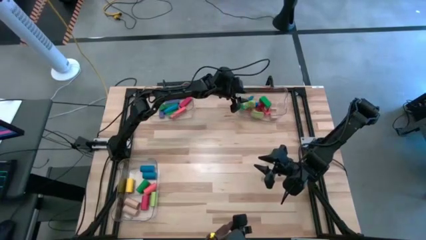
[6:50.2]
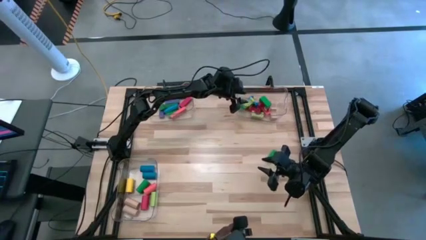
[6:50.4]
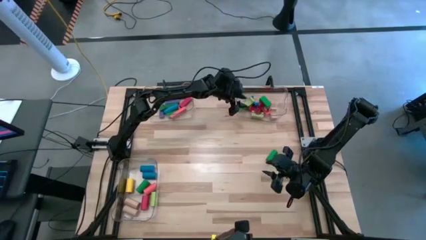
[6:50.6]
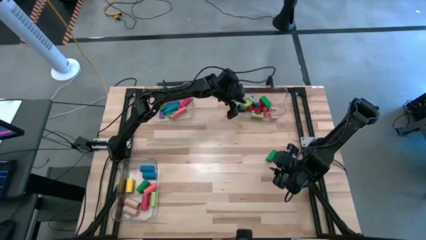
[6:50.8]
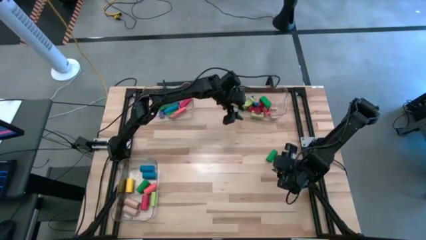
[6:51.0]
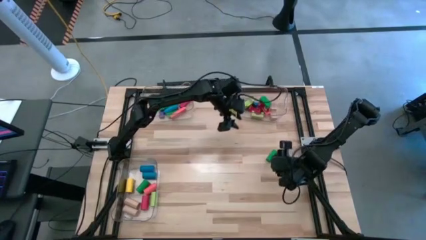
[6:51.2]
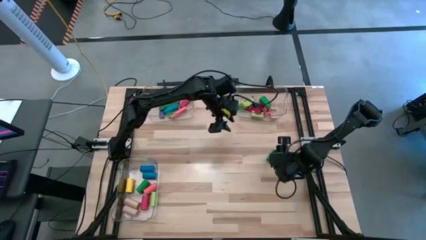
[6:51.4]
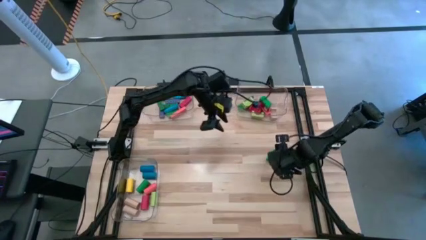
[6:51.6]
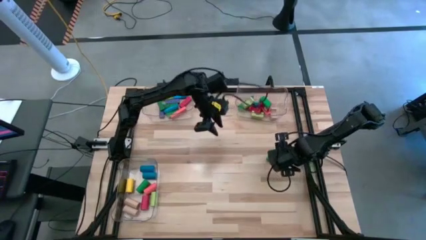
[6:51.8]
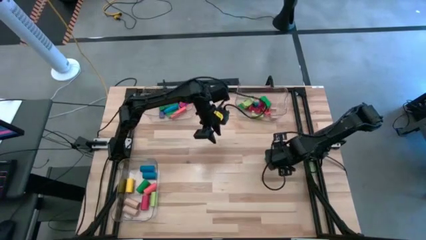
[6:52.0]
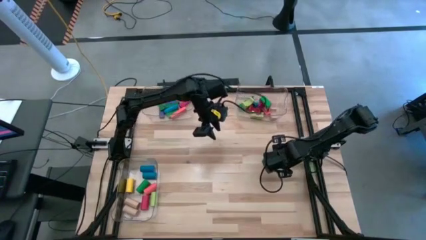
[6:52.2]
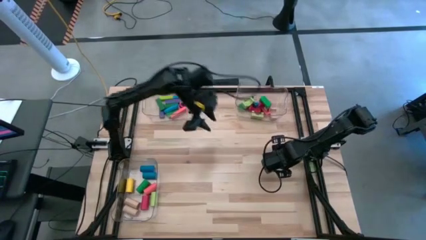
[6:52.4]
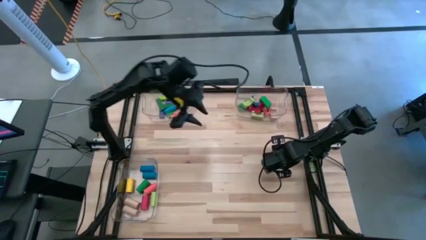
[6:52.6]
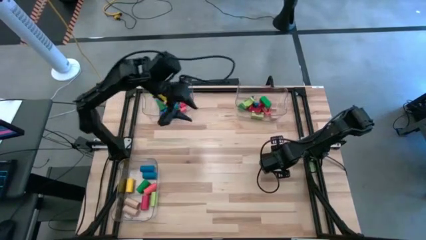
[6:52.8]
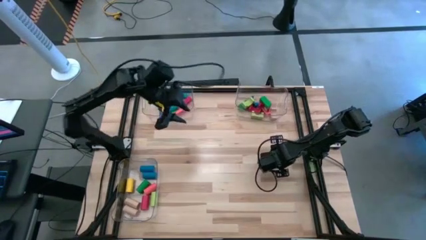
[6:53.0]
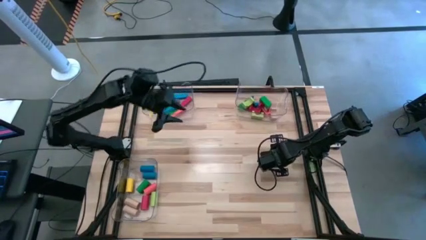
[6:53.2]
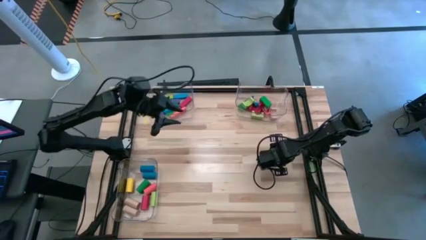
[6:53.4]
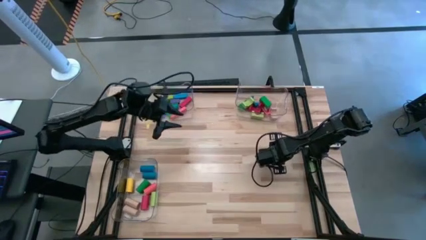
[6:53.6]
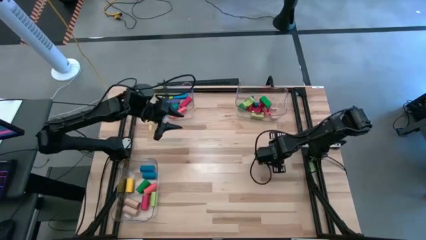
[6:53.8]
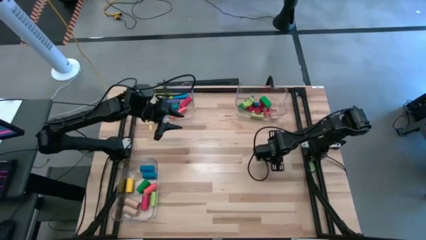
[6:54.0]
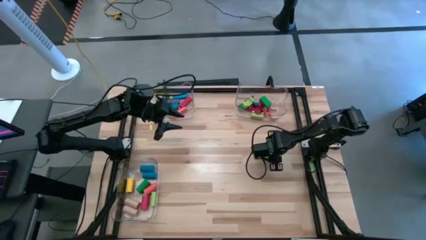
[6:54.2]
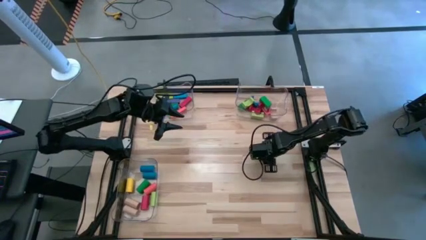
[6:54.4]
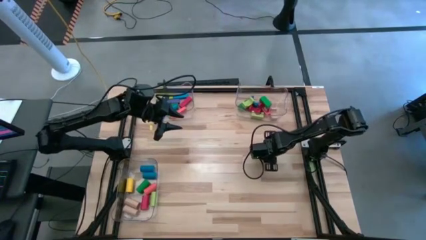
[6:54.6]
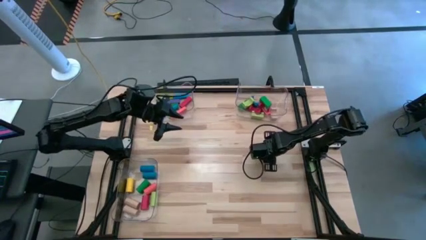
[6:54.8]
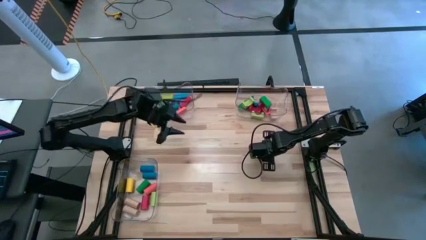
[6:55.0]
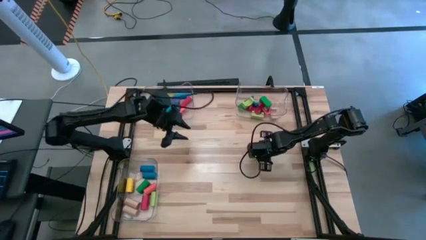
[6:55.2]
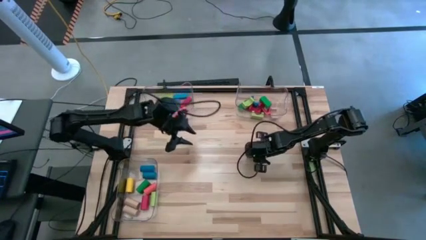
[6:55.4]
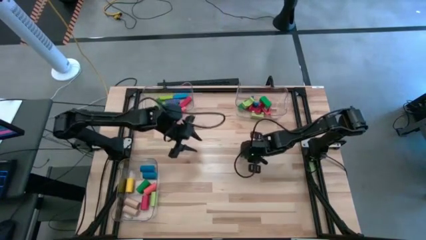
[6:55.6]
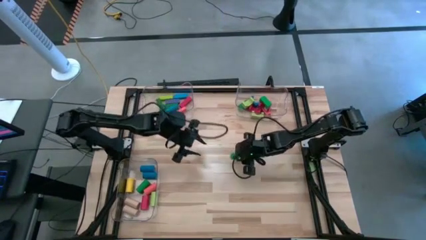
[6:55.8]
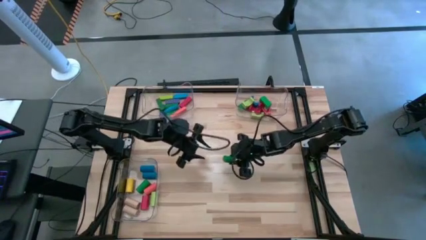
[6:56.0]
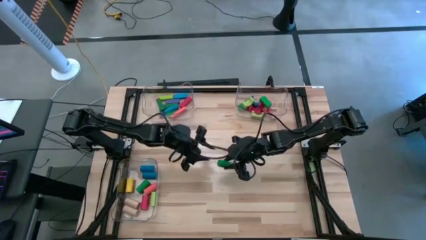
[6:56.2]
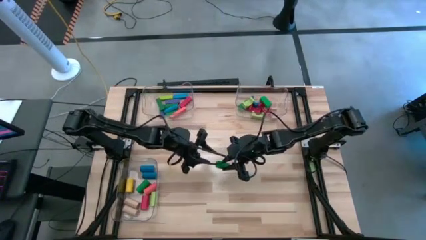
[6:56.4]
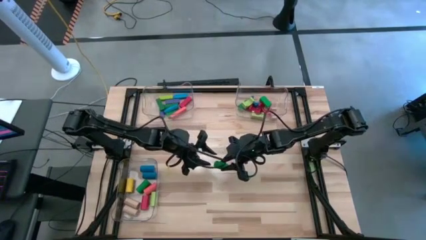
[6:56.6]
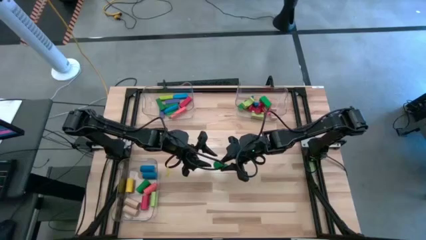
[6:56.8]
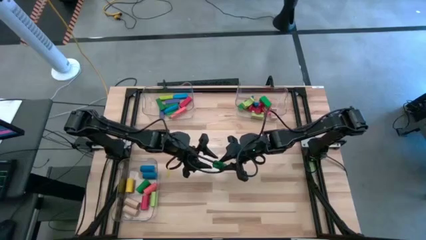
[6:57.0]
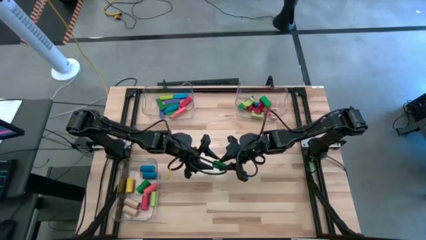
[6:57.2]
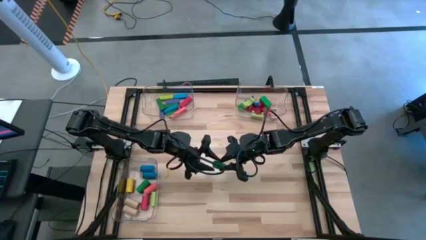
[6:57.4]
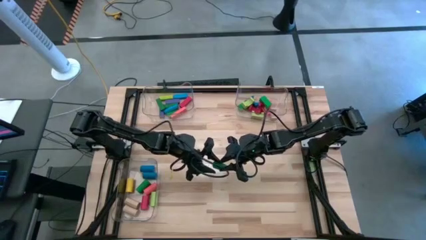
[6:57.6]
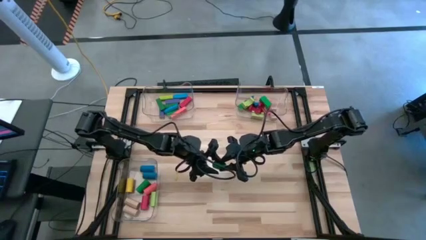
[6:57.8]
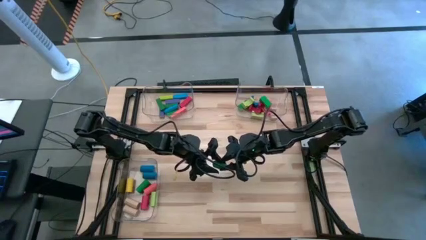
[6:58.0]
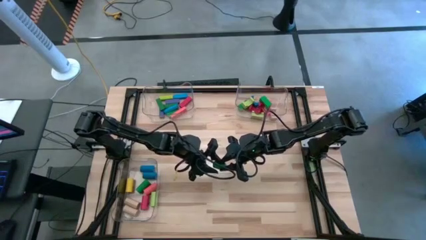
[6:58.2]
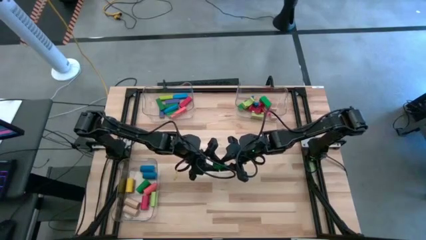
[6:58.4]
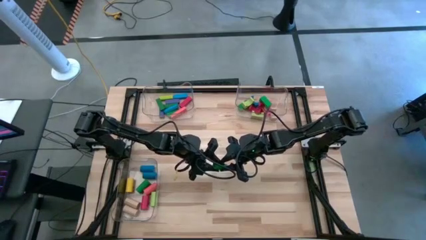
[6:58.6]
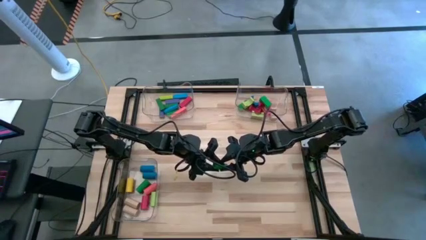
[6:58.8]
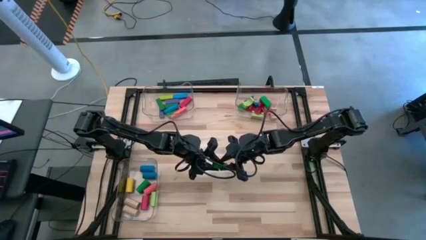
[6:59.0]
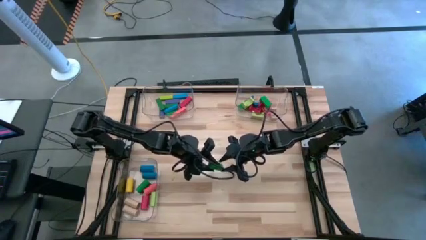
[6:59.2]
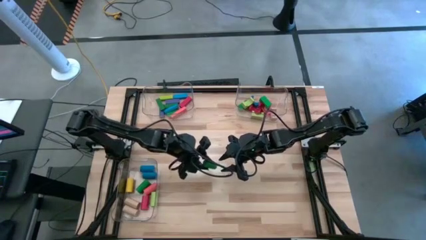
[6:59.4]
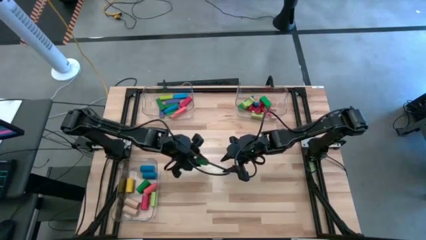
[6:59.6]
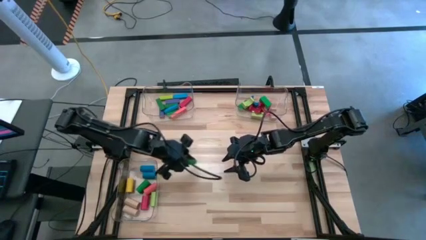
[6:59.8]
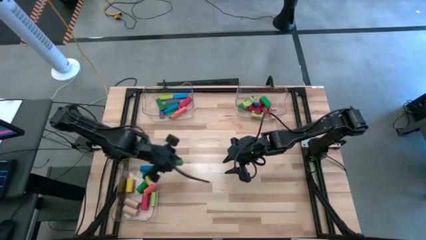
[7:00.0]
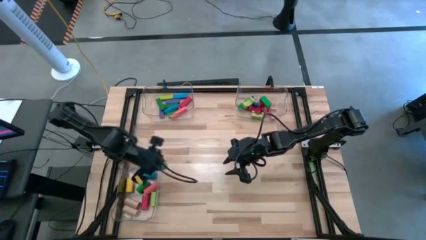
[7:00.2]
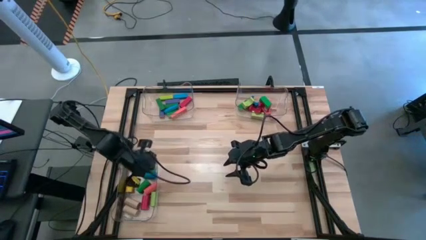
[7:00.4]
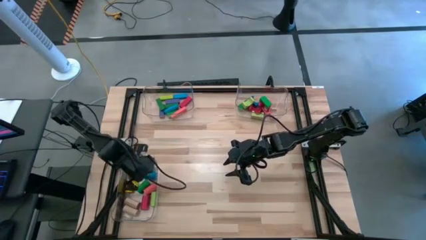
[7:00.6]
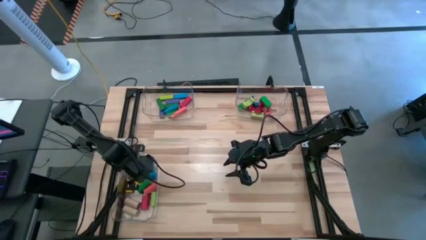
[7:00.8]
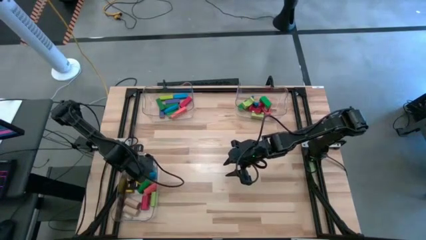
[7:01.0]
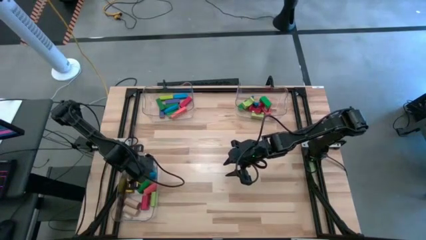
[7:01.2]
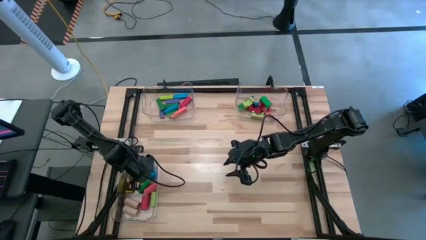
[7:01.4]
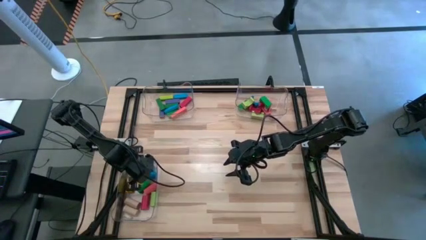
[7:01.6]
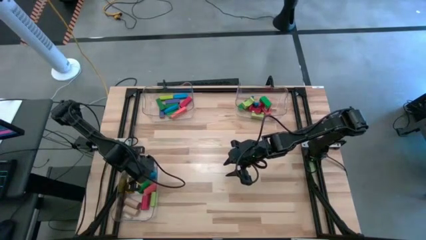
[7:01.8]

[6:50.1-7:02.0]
Task: Sort blocks by size
Put the green cylindrical block into the bottom left transparent bin

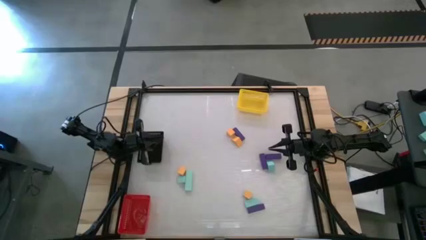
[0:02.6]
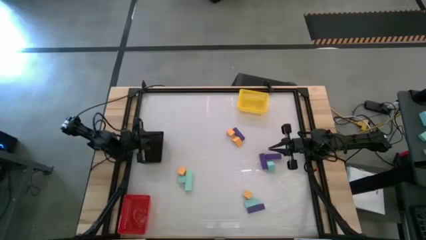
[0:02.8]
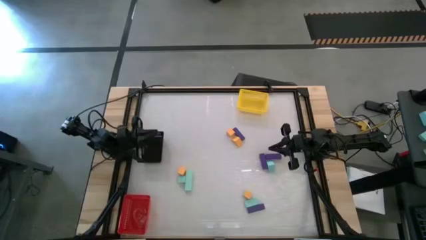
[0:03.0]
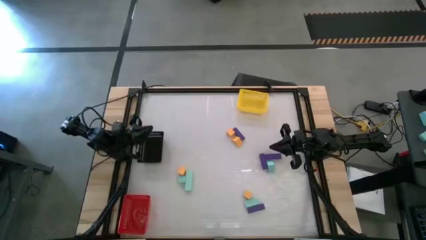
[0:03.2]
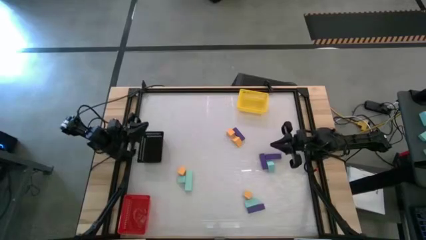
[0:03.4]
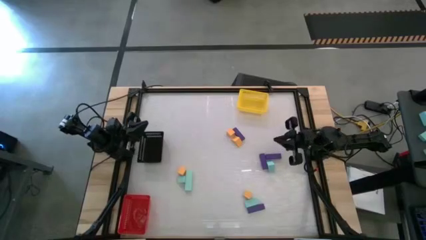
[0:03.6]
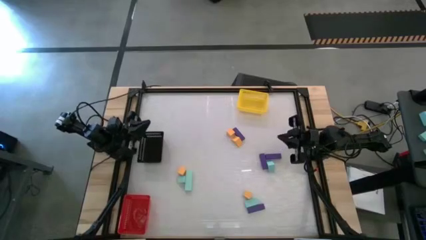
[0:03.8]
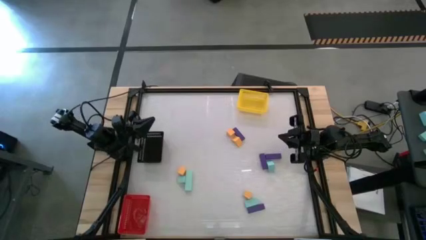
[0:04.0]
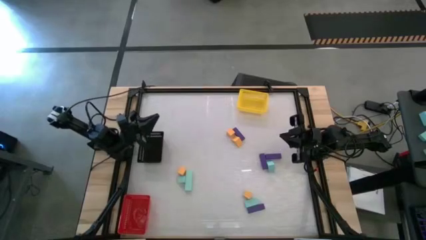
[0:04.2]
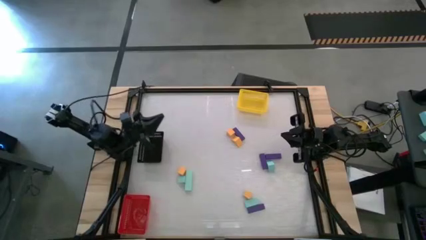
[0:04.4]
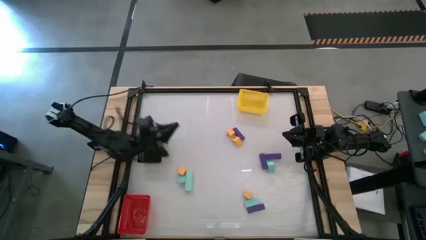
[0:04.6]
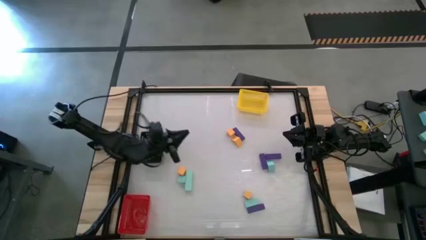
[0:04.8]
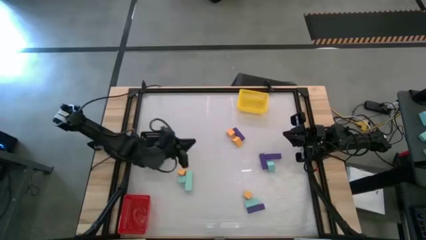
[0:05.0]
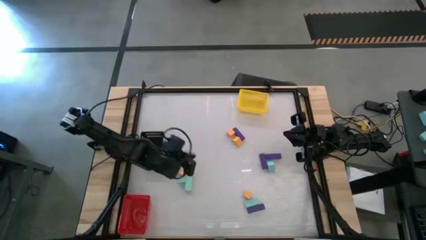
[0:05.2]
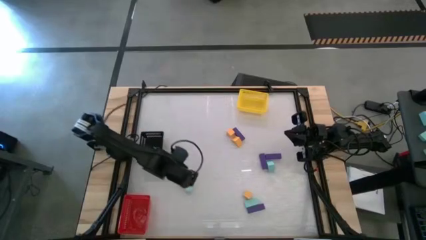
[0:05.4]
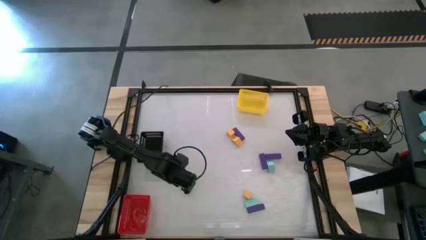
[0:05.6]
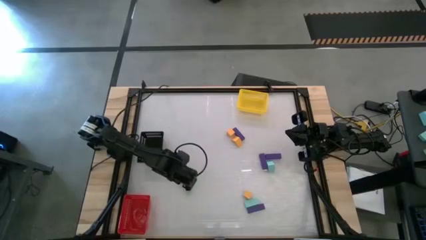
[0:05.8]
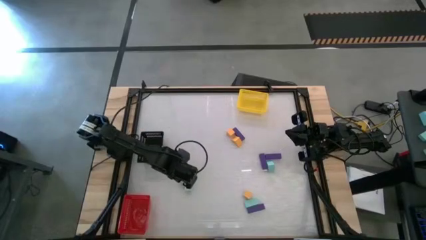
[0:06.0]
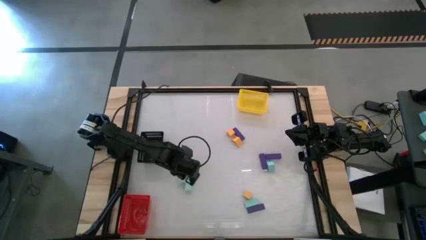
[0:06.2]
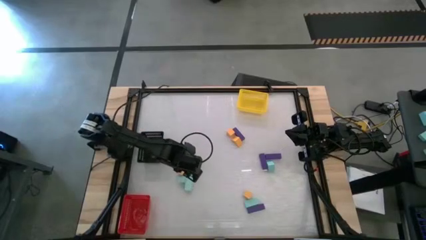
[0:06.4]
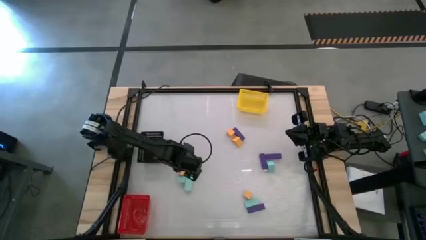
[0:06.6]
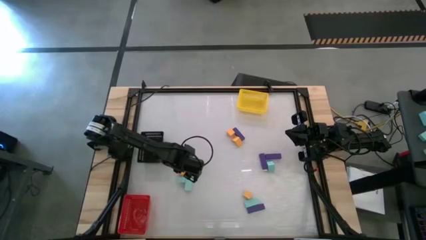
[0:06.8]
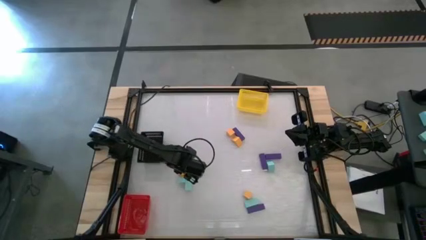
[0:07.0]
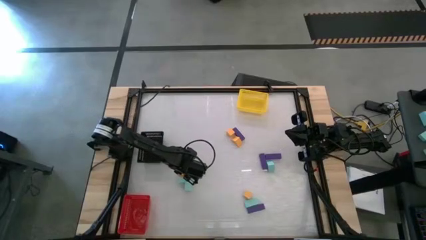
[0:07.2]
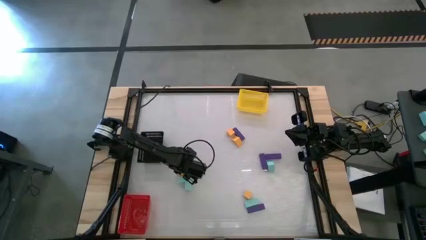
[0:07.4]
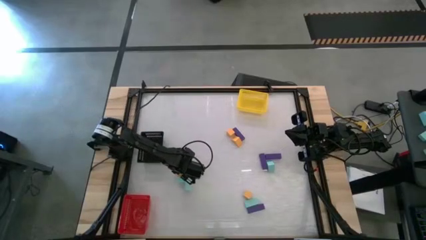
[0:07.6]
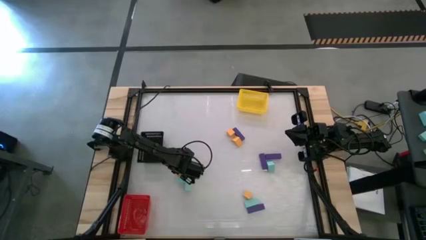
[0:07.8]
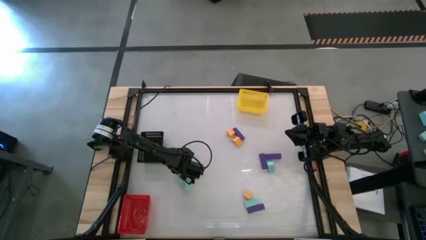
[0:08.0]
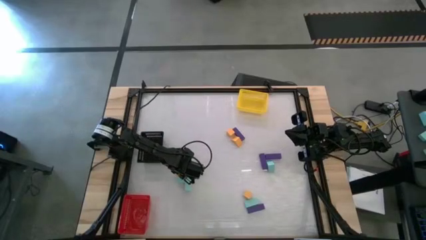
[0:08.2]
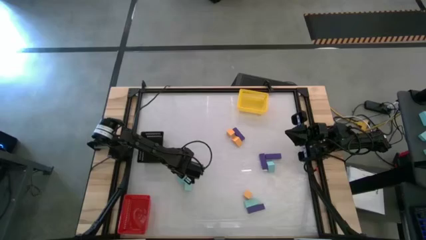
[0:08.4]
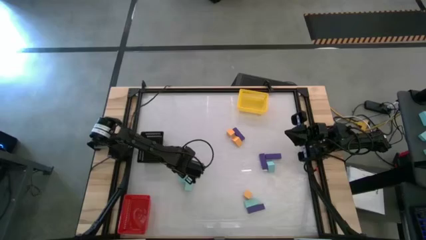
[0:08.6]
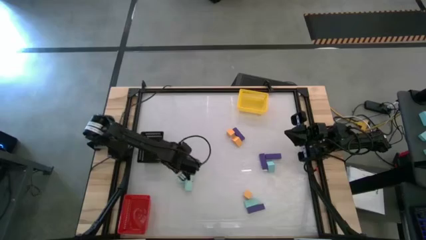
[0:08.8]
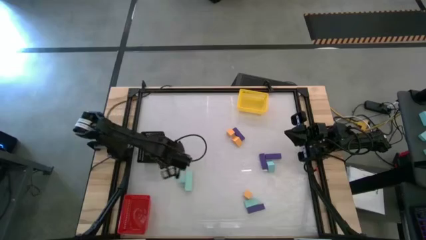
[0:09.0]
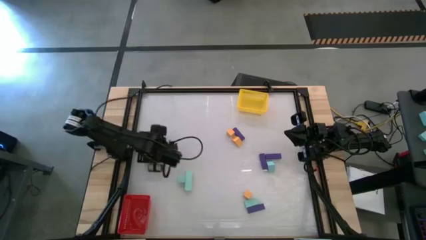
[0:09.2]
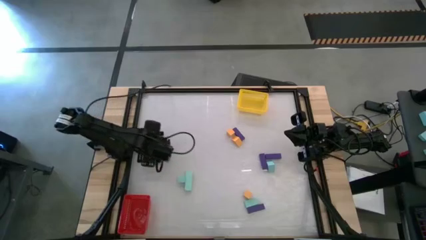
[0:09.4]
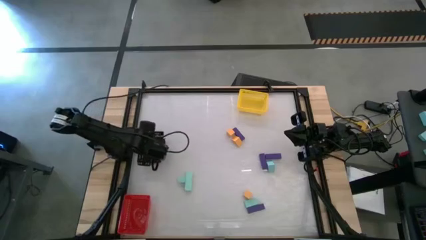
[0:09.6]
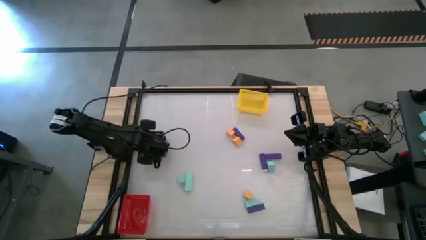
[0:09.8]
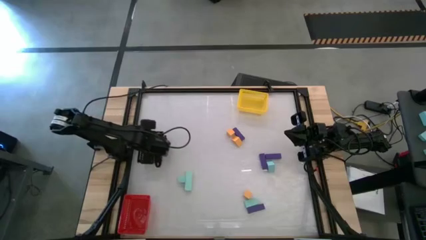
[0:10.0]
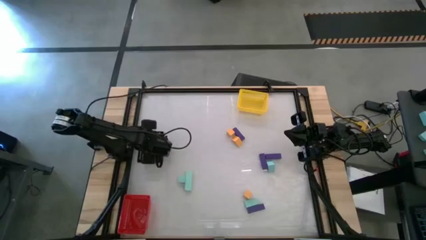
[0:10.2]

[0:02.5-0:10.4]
Task: Sort & place blocks by color
Put the yellow block into the black bin
